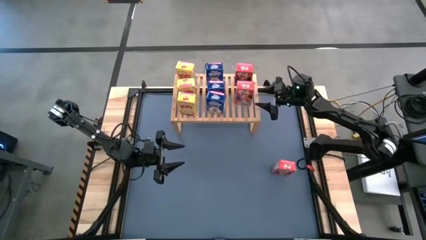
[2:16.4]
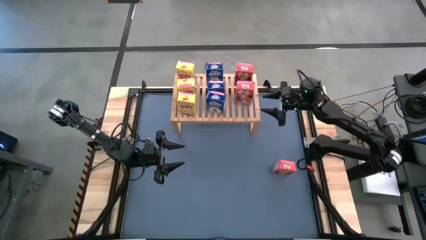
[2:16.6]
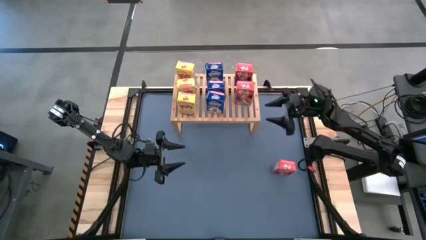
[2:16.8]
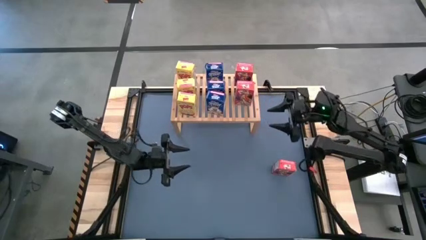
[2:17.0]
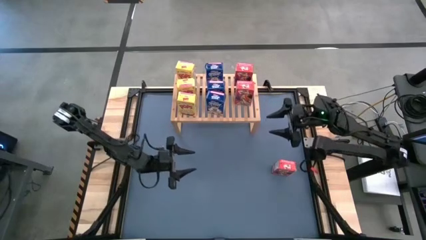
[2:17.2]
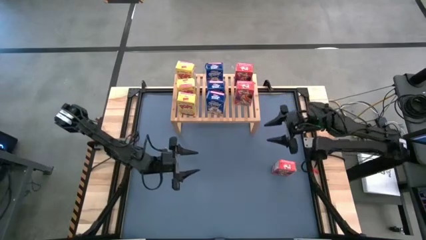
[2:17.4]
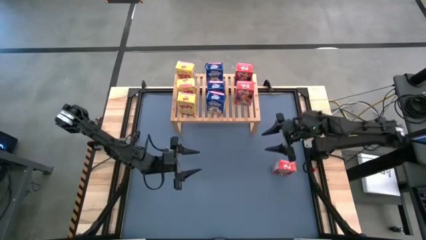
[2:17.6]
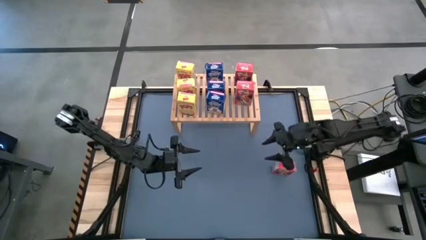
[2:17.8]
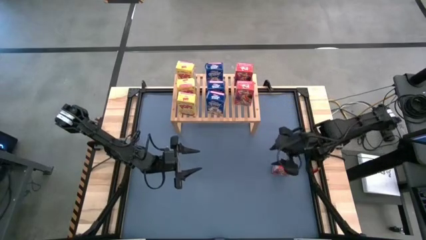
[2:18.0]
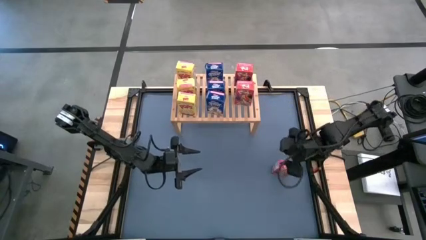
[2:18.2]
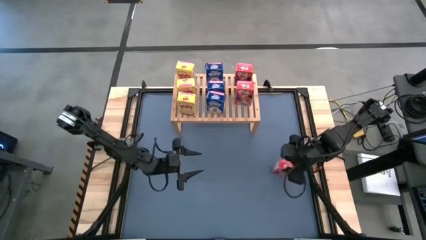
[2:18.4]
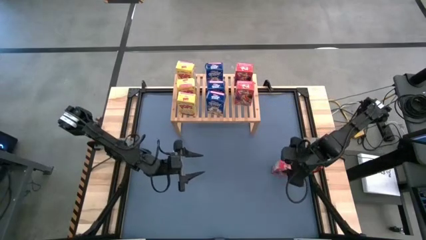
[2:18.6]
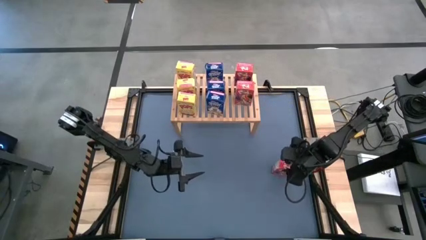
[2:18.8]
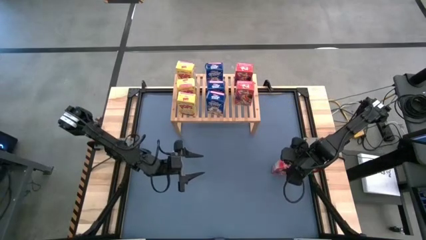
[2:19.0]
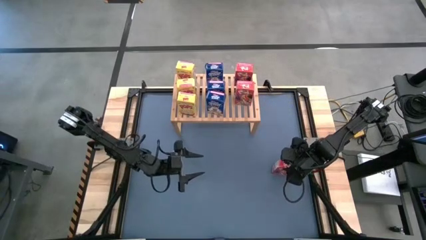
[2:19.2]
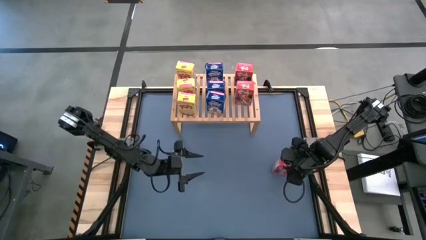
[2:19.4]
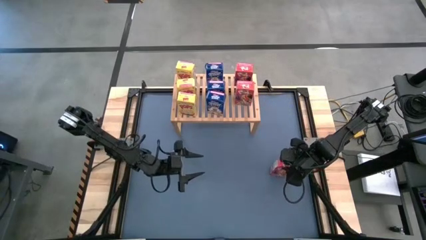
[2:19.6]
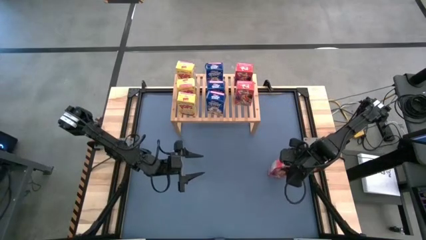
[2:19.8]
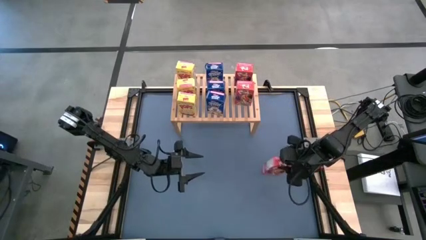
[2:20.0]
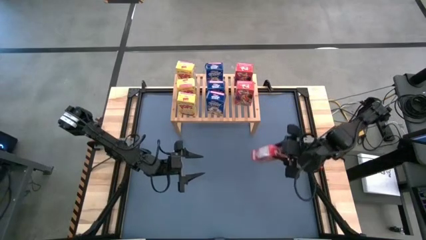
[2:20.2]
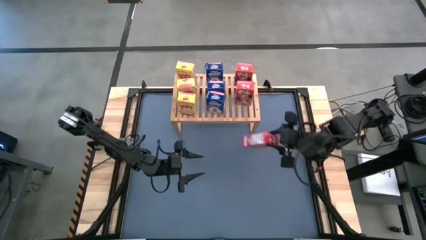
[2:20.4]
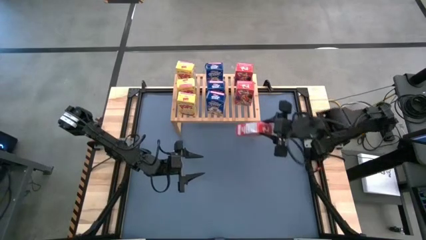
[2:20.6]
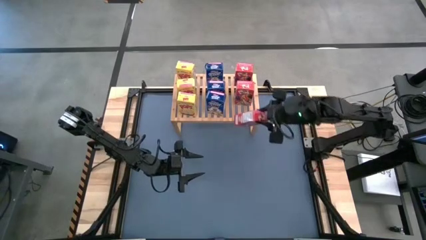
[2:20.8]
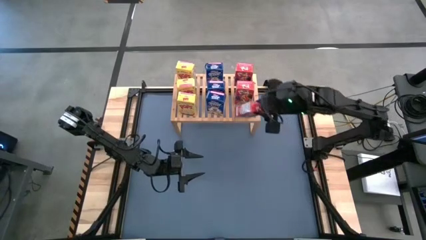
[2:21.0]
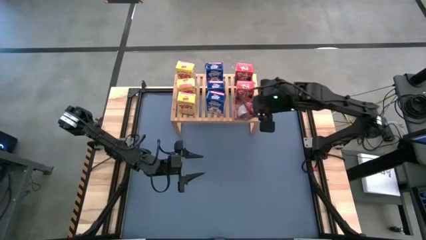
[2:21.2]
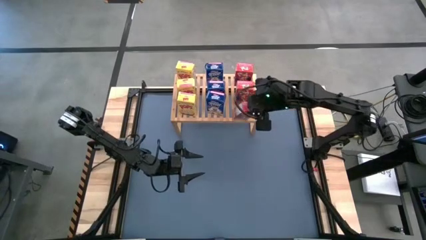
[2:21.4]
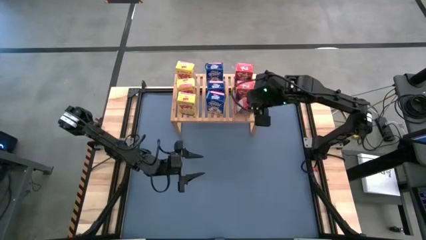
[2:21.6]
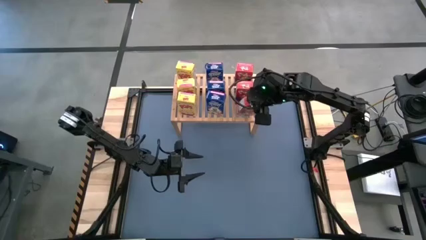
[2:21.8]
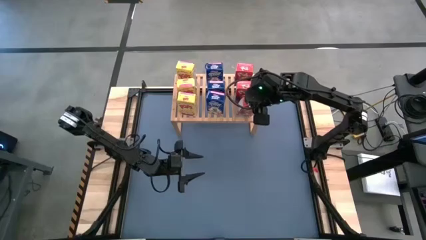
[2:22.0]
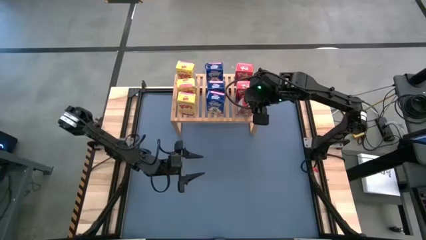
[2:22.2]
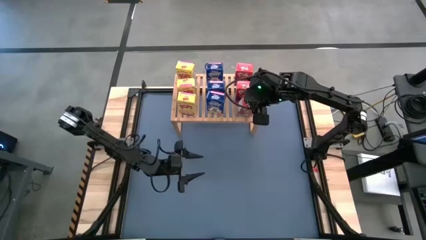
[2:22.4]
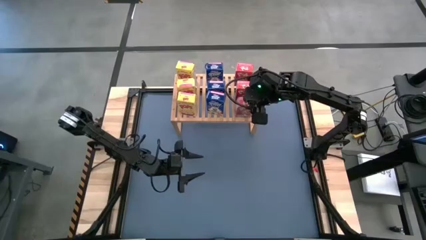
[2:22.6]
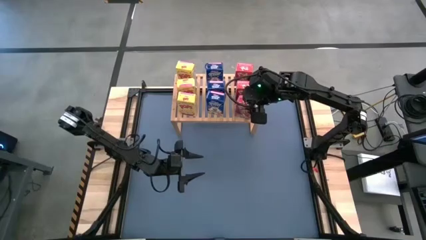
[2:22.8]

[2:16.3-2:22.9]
Task: Stack cereal on shelf
Put the red cereal box on the shelf aligned with the other red cereal boxes

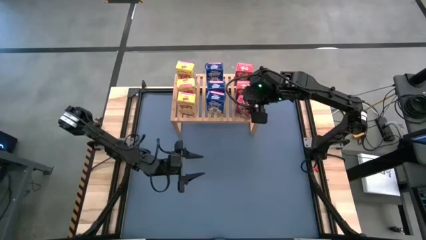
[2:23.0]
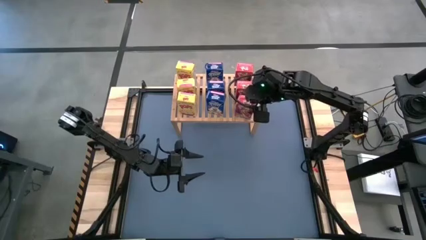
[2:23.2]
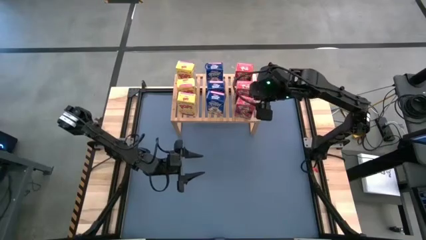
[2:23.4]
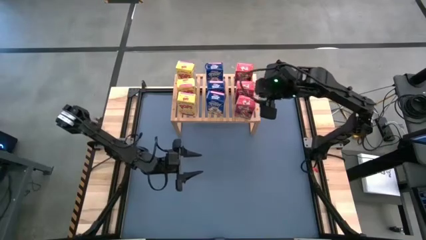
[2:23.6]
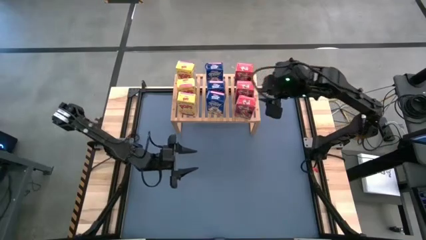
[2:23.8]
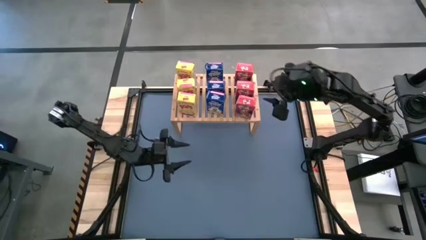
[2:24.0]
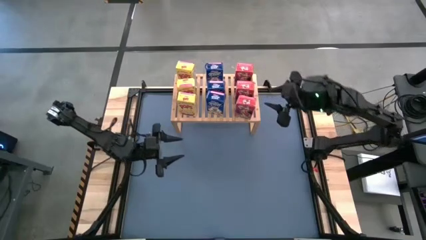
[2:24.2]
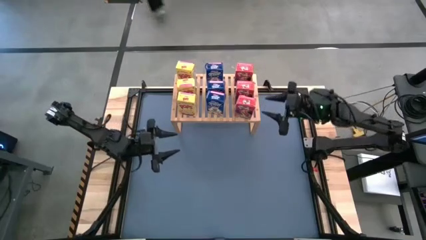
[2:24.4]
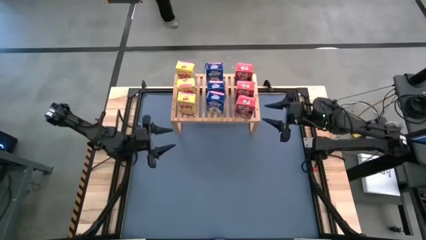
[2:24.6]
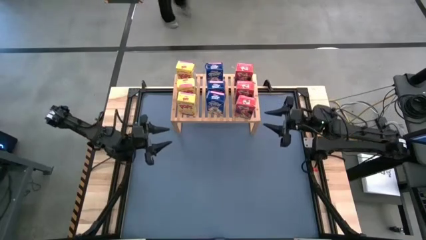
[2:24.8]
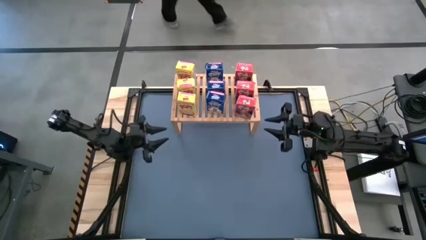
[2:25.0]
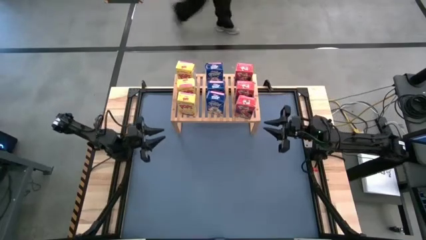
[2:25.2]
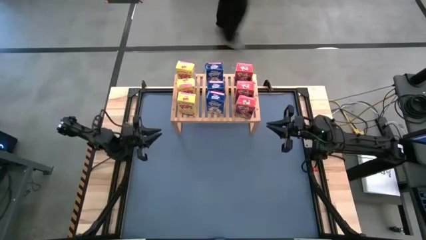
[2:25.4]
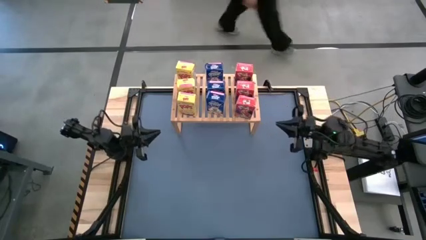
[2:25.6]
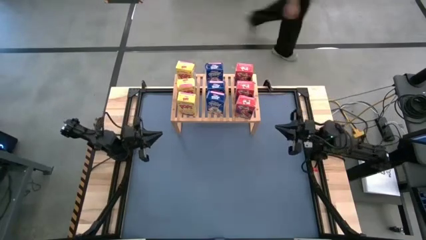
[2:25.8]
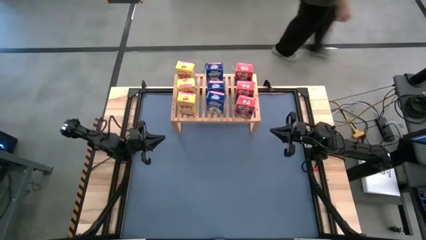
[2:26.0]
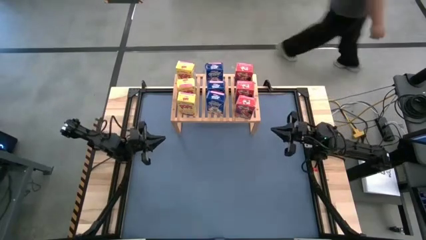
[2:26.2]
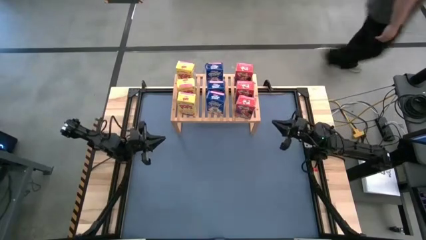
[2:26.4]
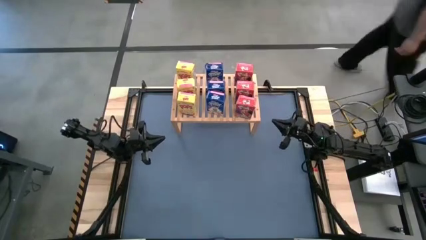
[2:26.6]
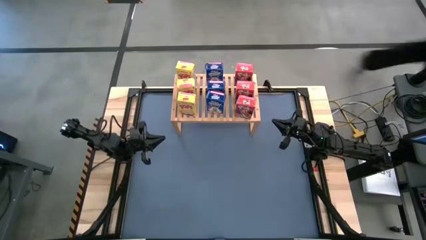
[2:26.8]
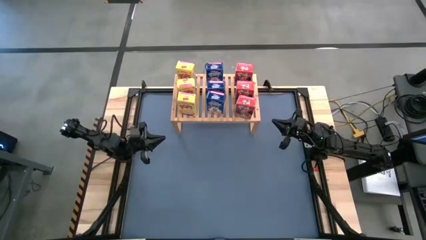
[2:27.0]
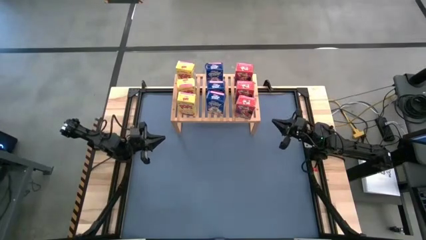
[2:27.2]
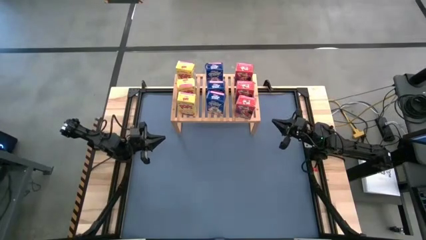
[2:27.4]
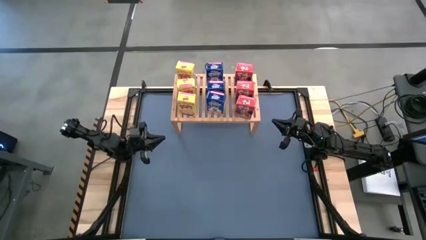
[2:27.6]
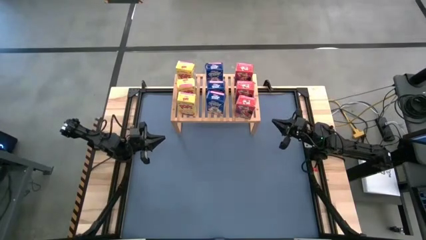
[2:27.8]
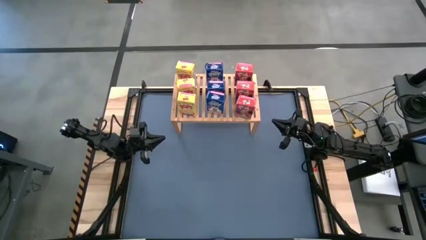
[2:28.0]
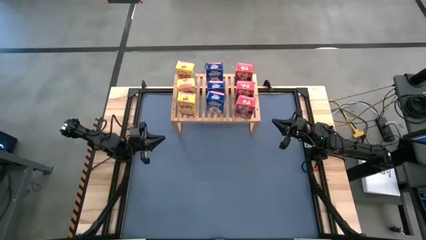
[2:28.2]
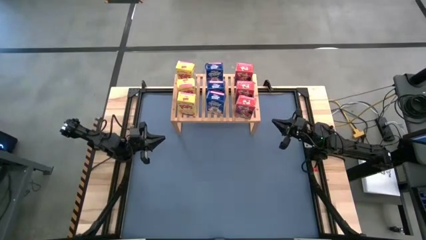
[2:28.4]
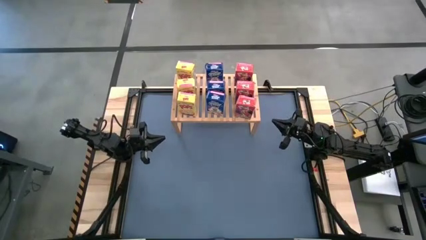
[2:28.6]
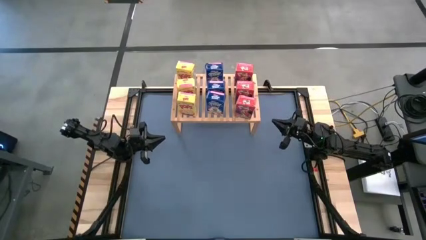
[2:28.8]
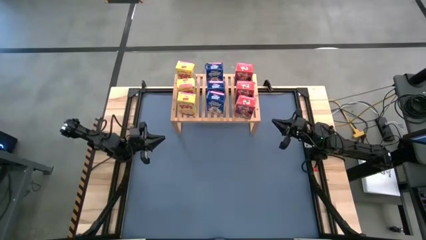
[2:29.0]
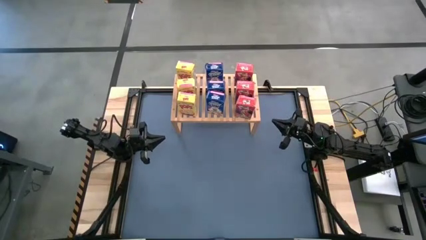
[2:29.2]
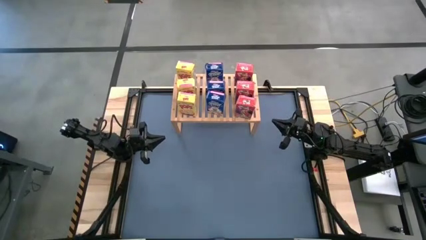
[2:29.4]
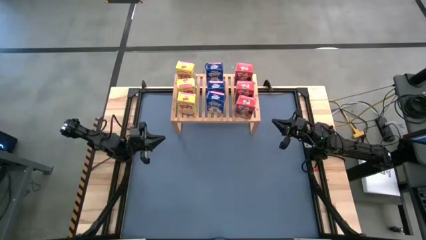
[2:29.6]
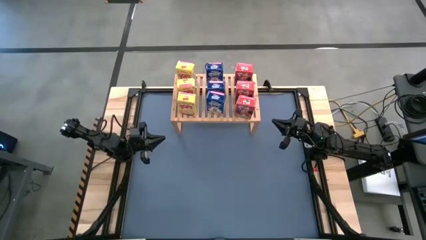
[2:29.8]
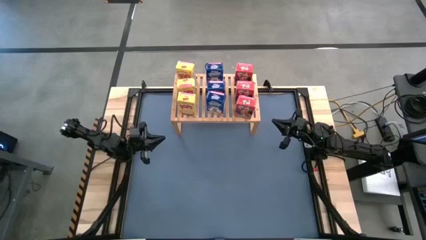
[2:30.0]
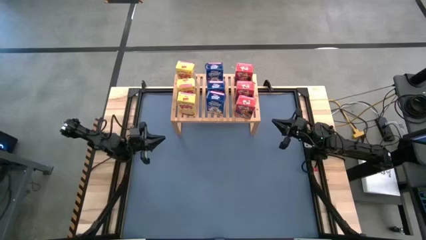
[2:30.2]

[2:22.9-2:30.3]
Return to Home Position
